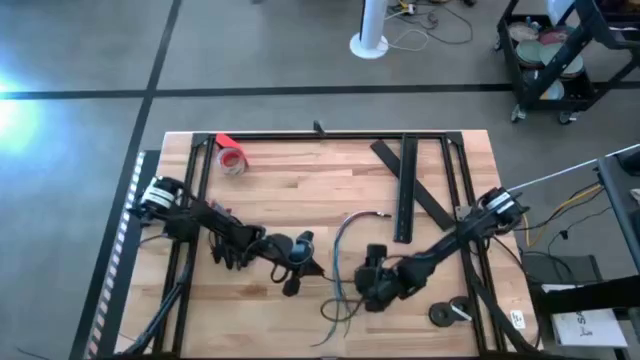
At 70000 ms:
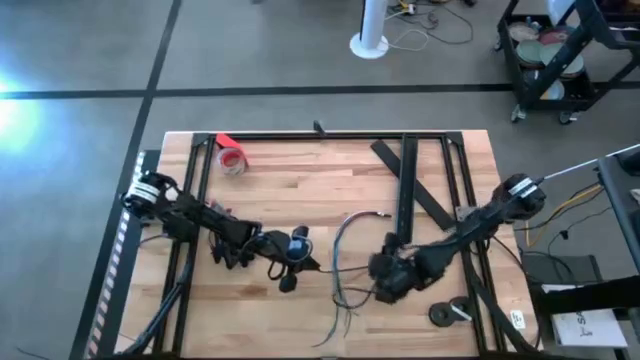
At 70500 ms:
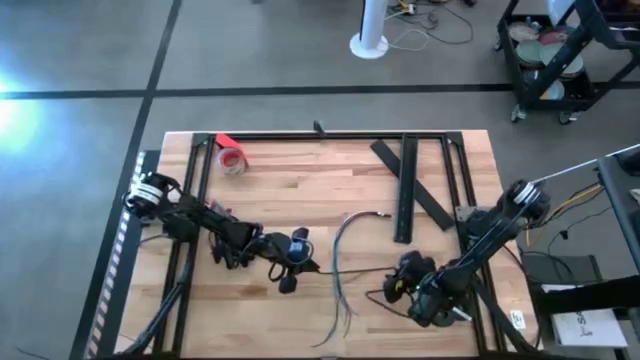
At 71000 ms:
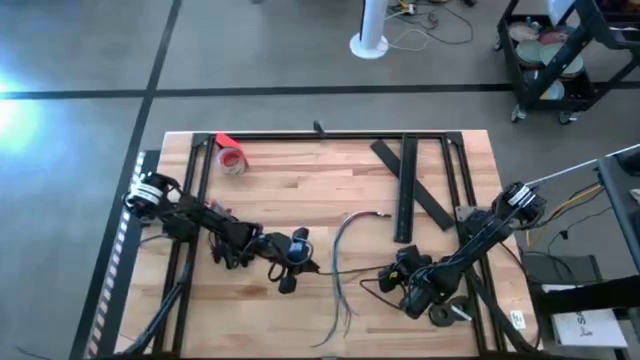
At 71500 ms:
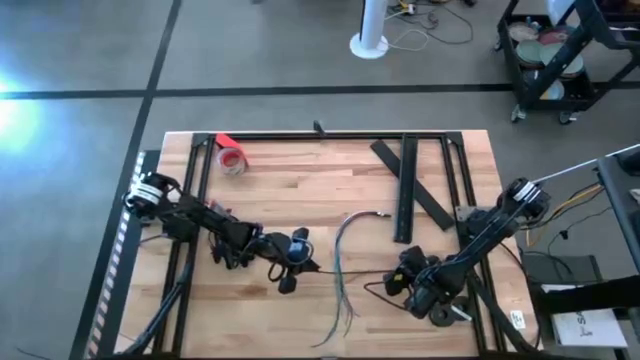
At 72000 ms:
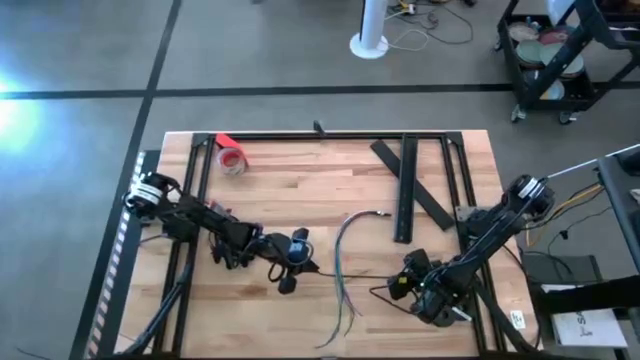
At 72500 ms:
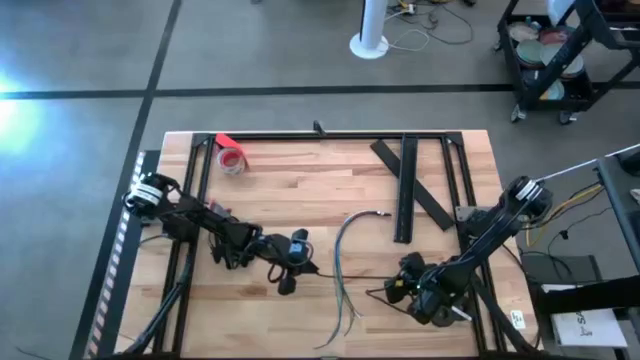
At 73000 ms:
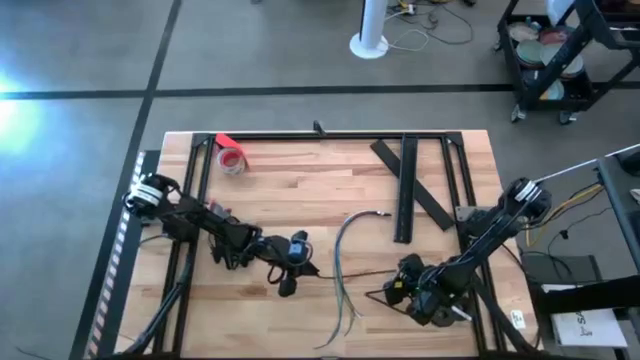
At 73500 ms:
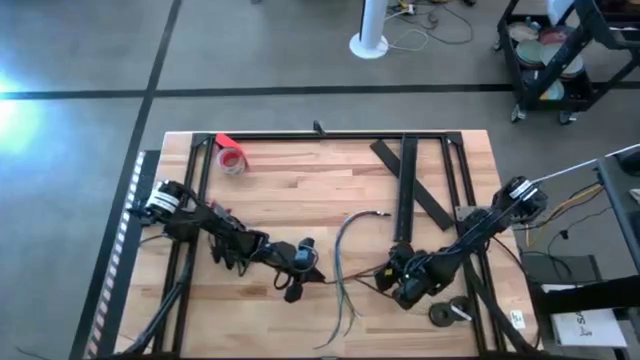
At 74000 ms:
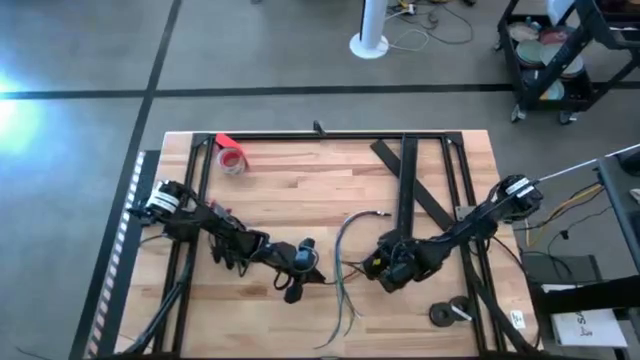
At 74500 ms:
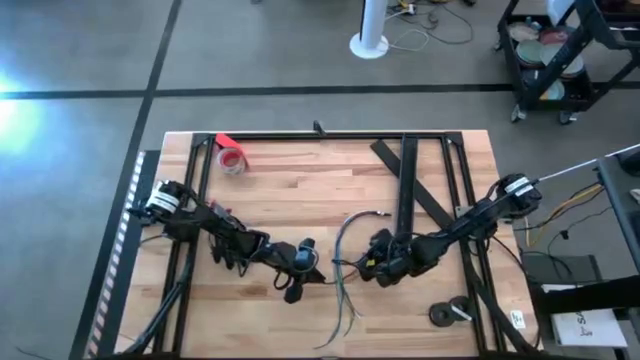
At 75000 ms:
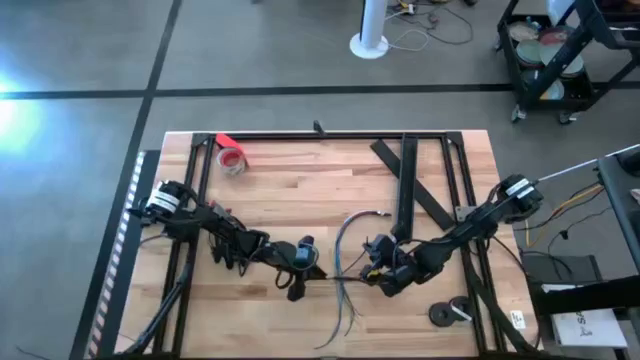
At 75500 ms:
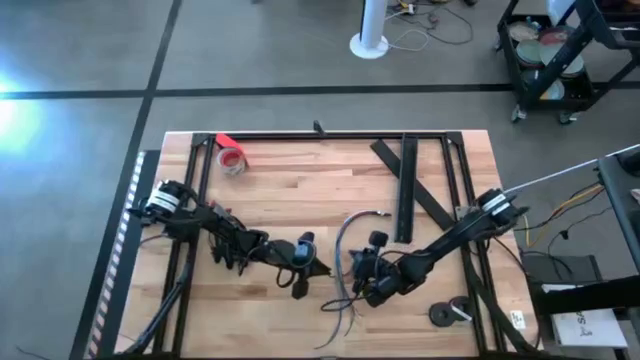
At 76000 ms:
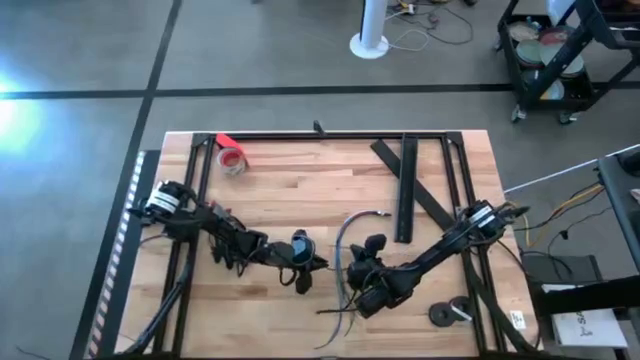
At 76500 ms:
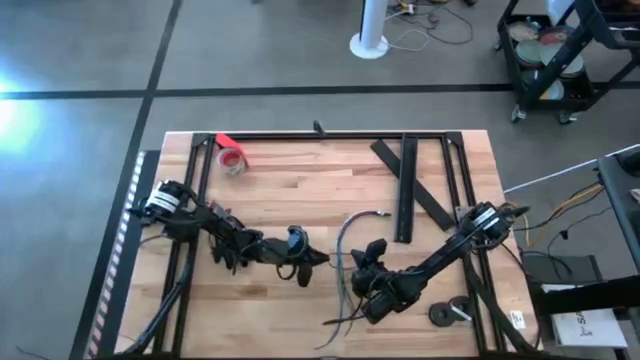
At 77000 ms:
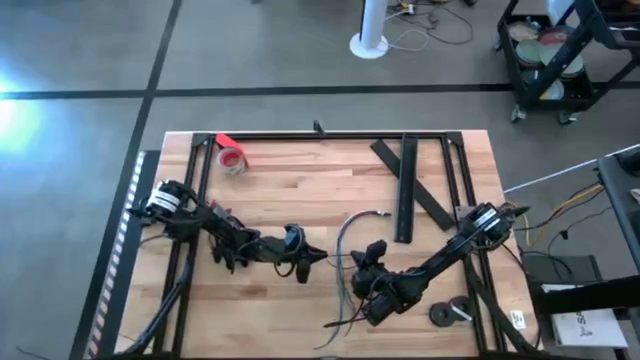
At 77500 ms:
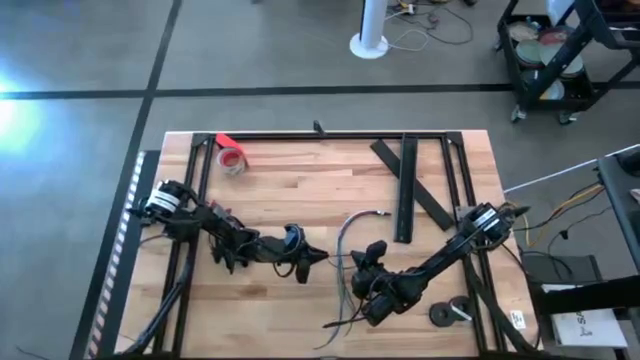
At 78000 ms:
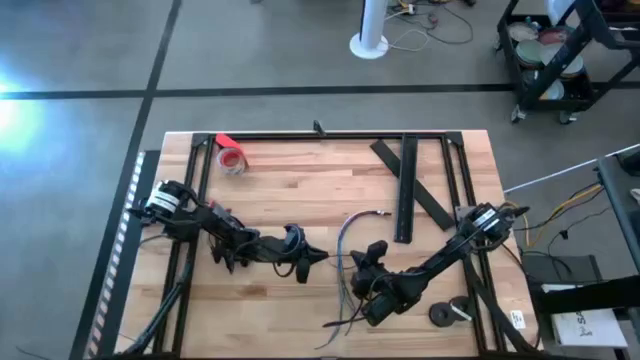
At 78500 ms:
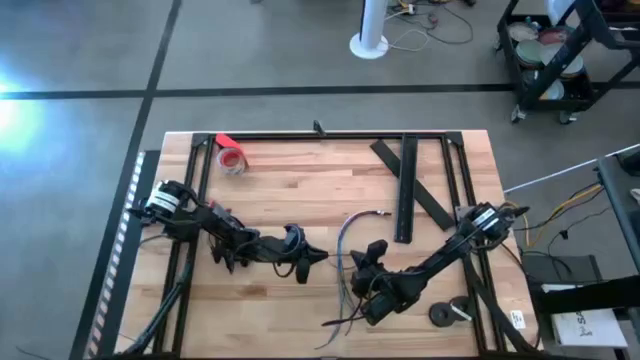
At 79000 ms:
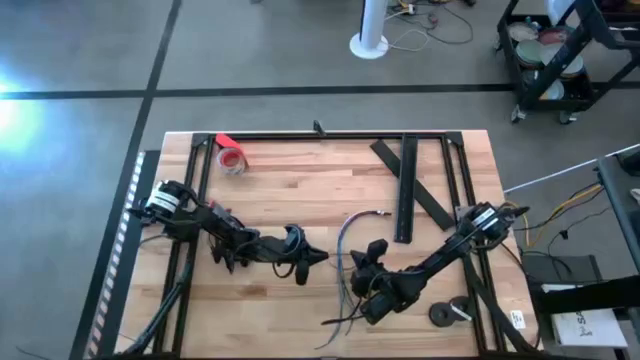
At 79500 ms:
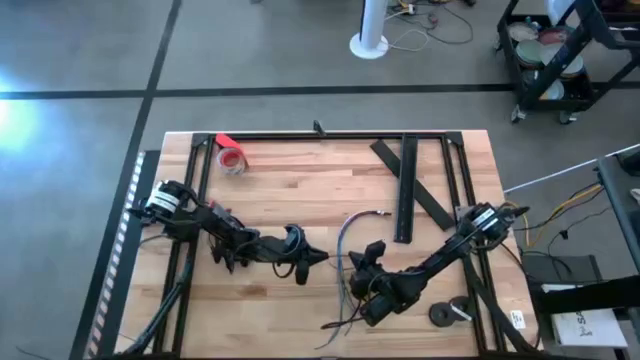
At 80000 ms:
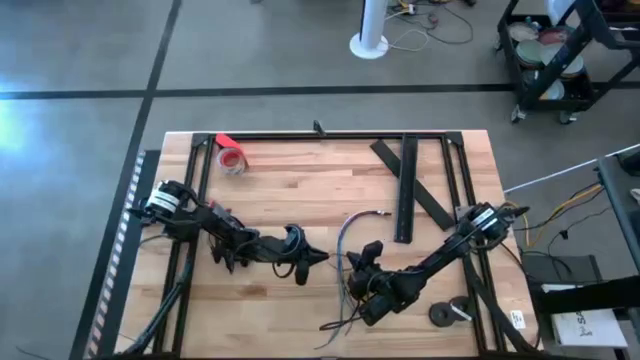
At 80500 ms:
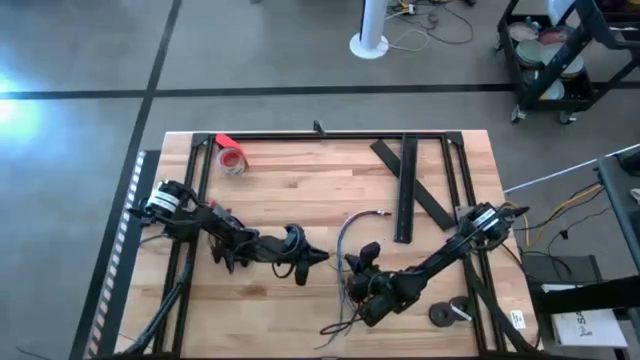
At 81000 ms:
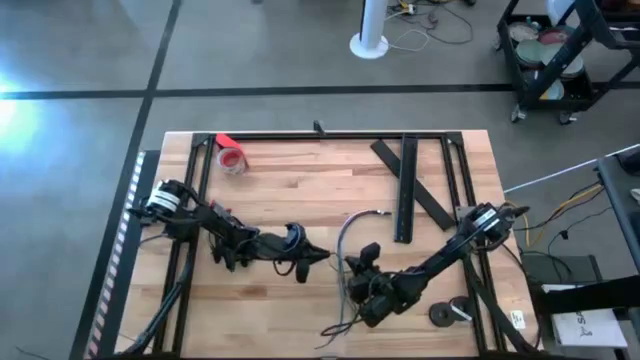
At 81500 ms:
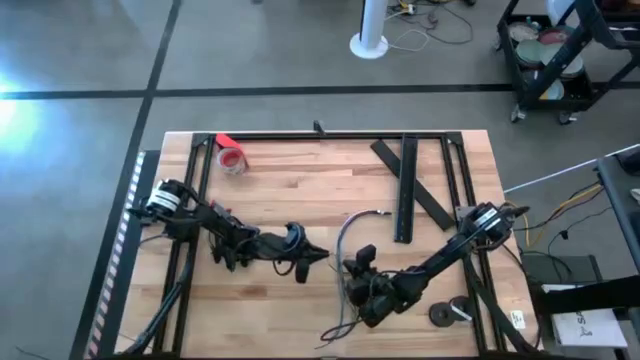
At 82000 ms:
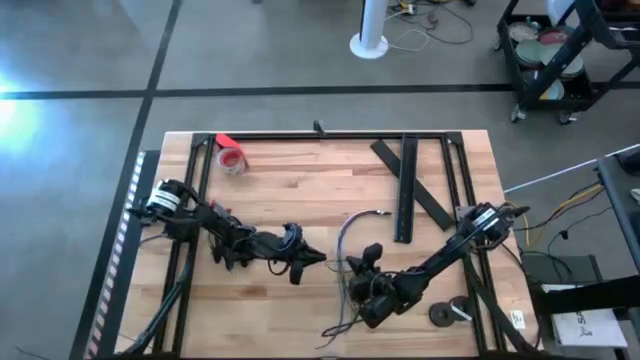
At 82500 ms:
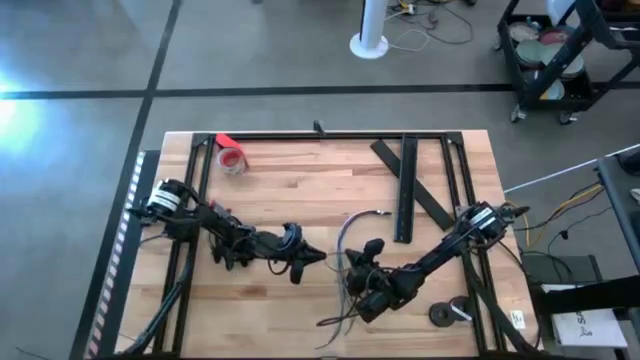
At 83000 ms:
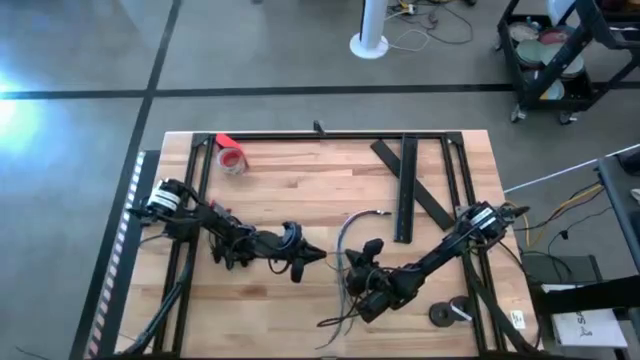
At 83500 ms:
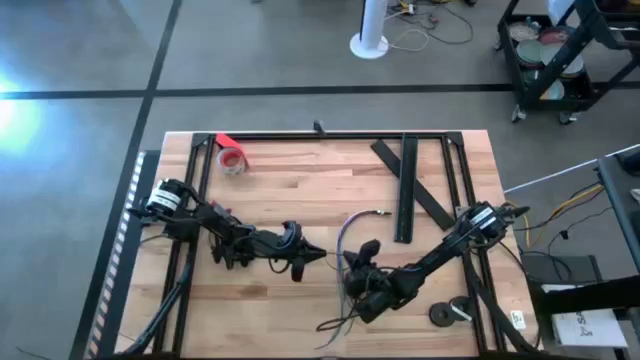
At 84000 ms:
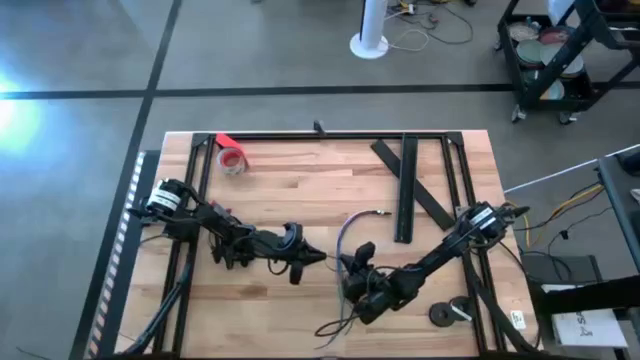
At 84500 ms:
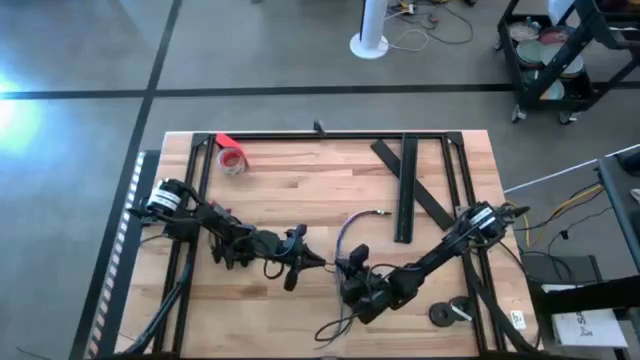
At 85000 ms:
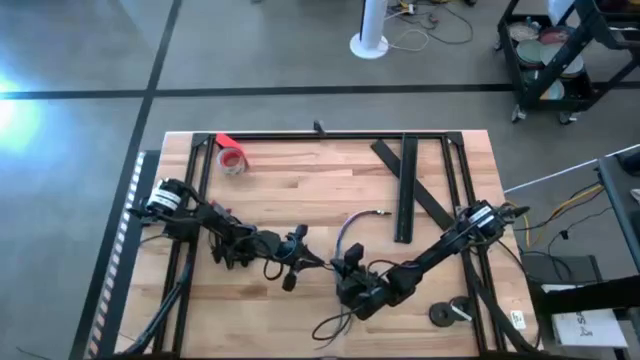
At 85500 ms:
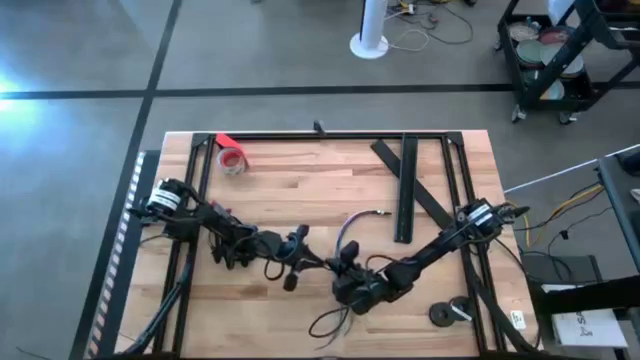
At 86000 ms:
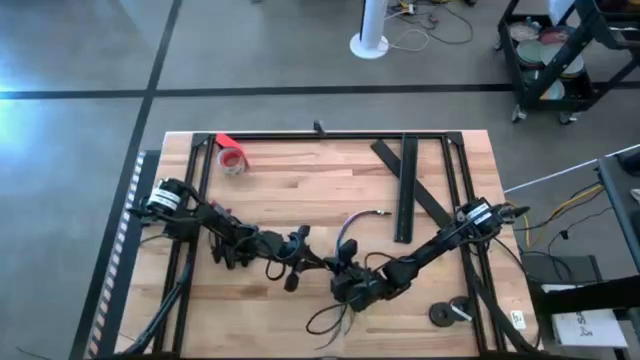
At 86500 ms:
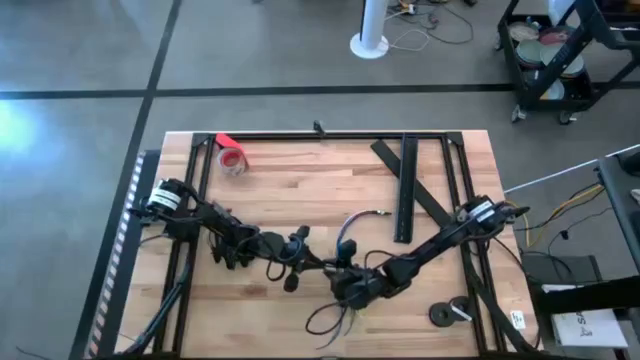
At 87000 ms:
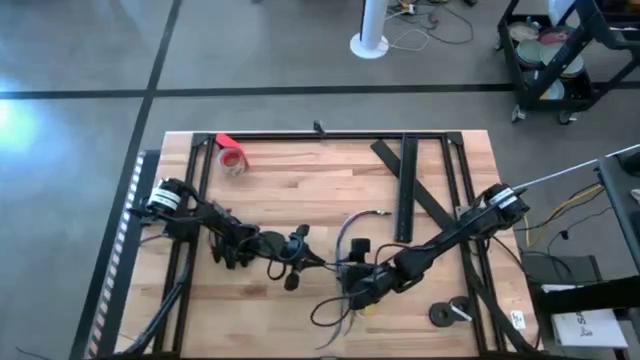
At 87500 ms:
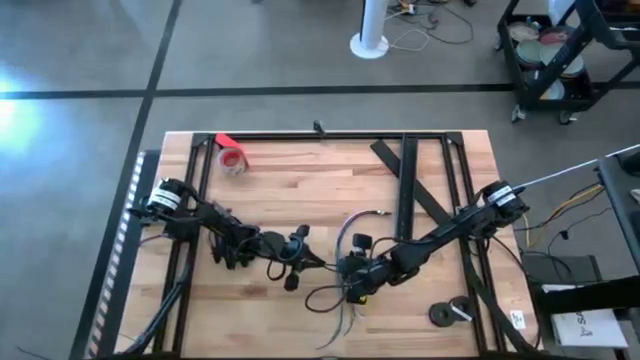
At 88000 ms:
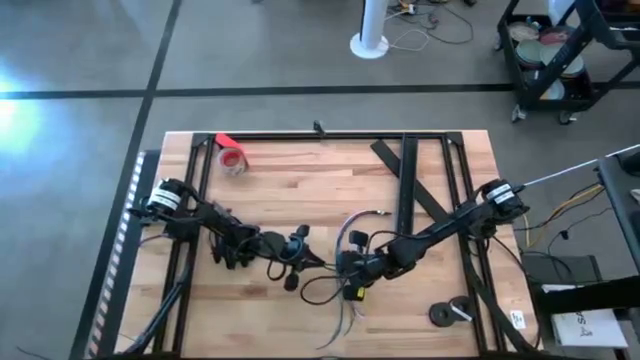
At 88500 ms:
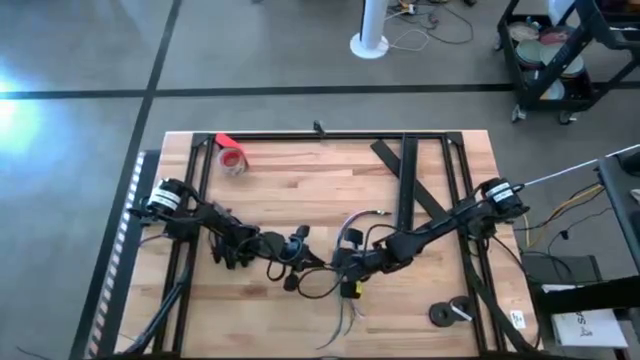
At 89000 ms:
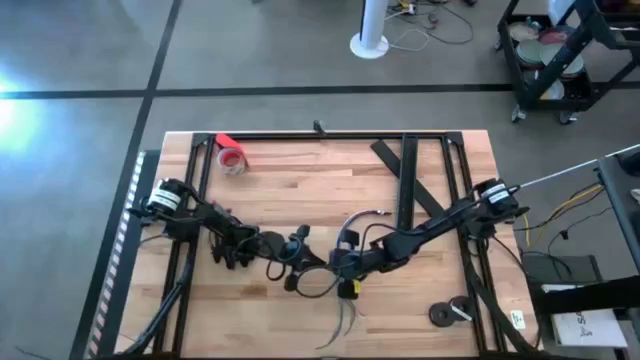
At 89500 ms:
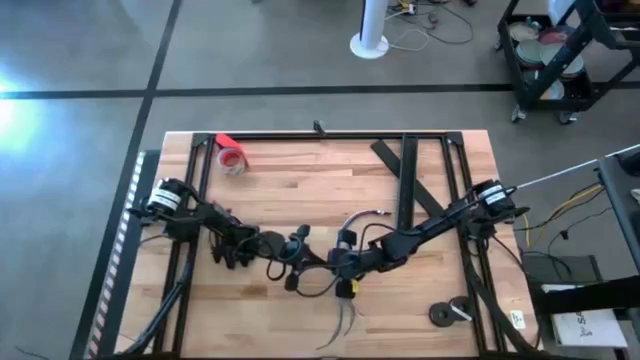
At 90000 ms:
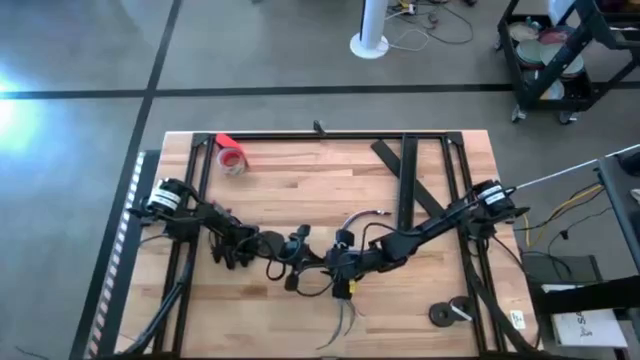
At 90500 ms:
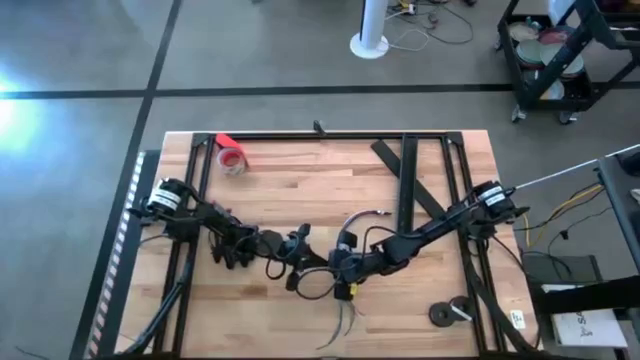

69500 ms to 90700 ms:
Task: Ziptie cables
Wrap the zip tie around the cable bundle
